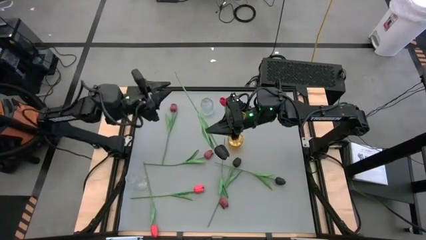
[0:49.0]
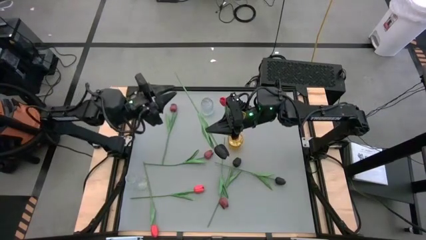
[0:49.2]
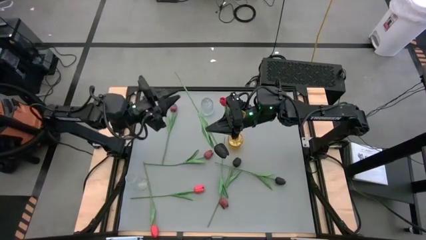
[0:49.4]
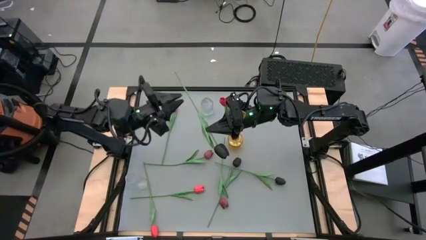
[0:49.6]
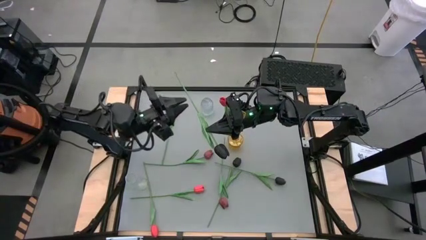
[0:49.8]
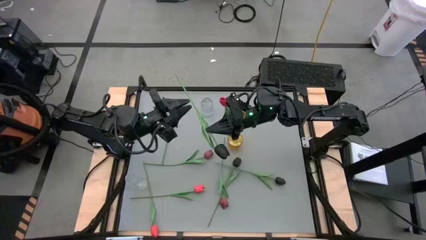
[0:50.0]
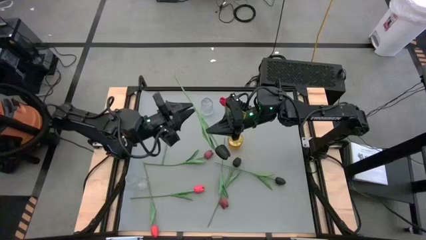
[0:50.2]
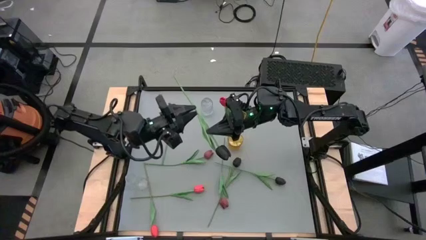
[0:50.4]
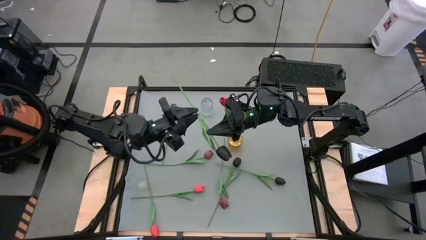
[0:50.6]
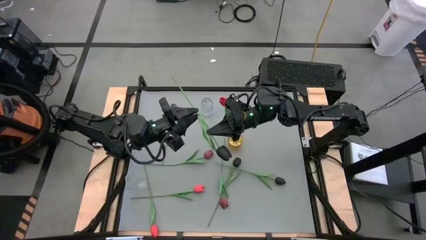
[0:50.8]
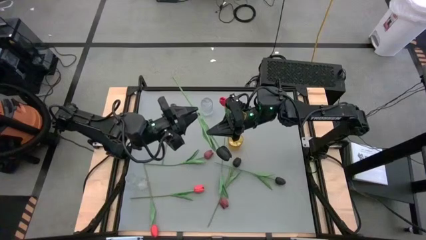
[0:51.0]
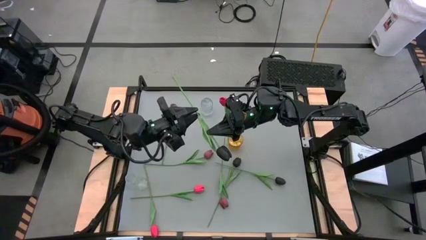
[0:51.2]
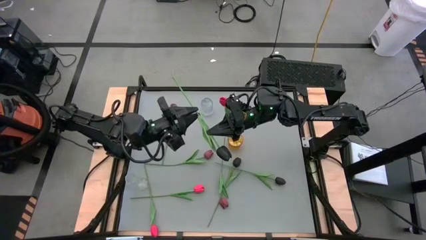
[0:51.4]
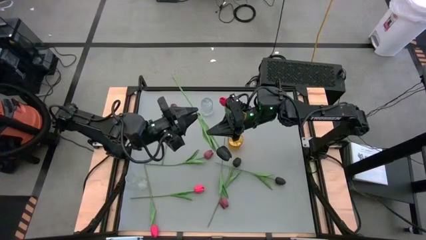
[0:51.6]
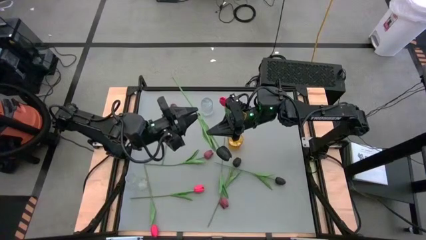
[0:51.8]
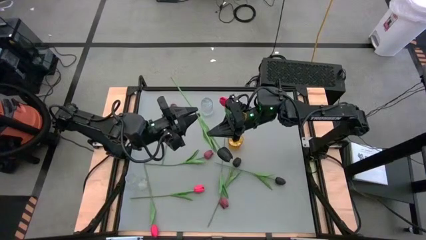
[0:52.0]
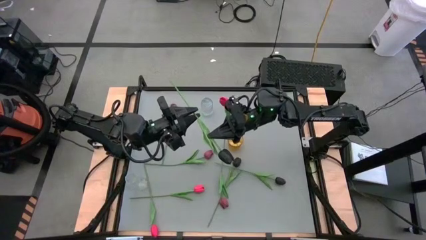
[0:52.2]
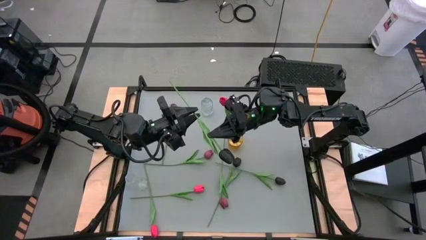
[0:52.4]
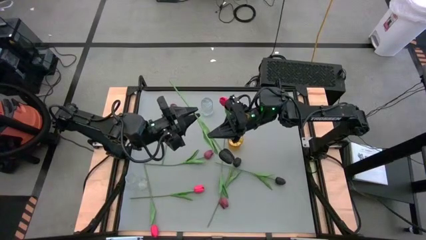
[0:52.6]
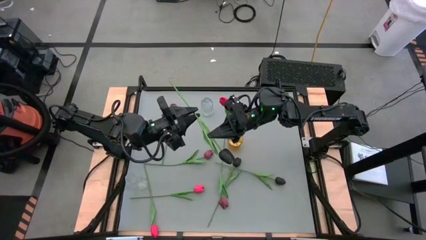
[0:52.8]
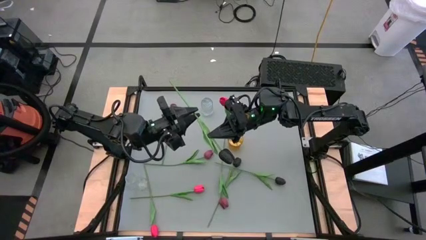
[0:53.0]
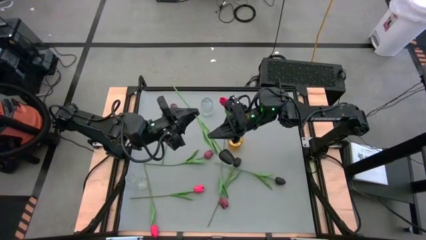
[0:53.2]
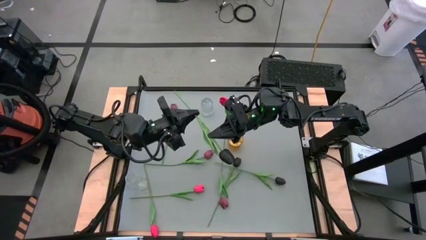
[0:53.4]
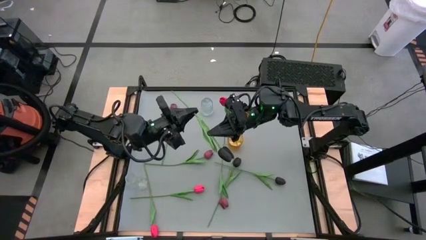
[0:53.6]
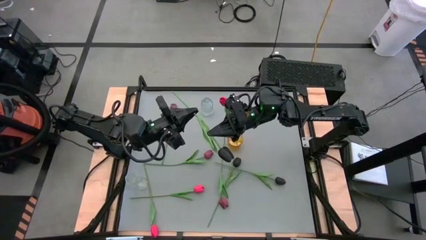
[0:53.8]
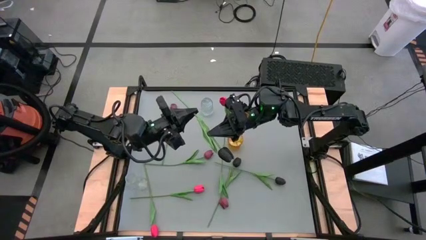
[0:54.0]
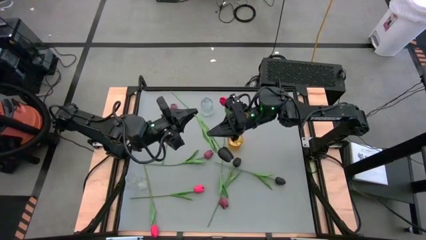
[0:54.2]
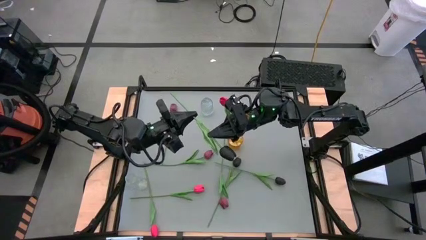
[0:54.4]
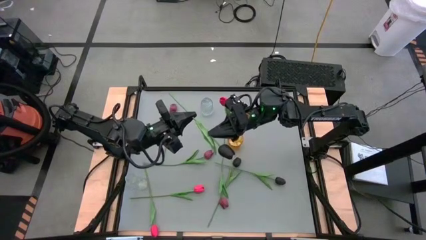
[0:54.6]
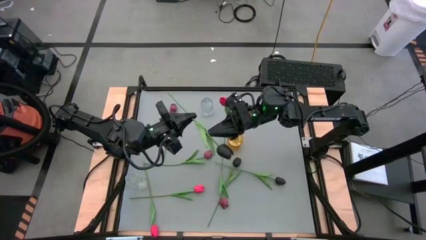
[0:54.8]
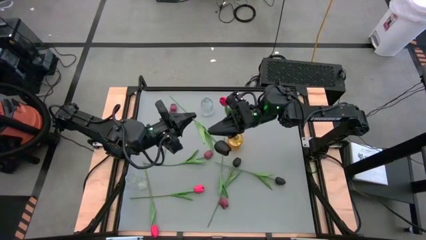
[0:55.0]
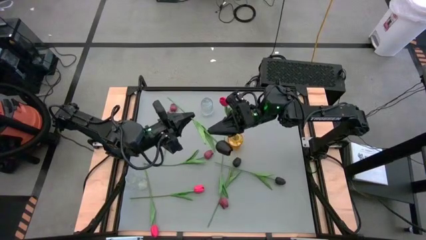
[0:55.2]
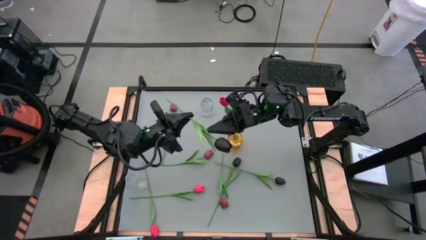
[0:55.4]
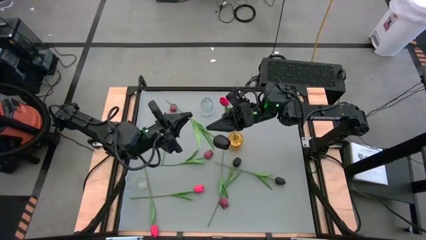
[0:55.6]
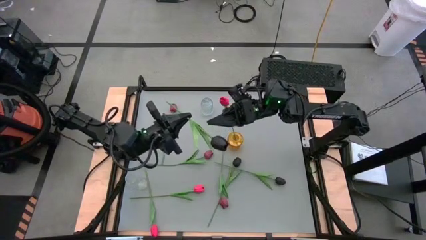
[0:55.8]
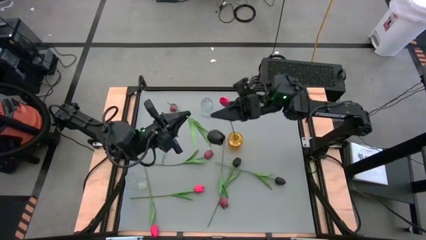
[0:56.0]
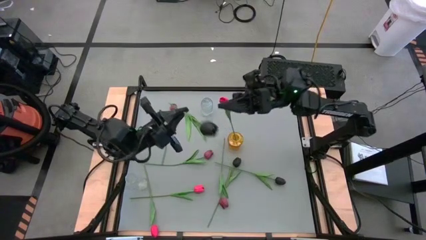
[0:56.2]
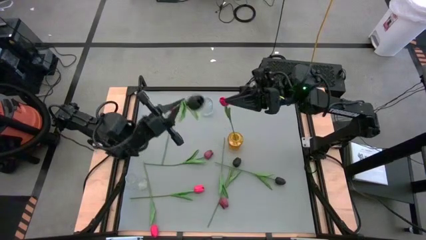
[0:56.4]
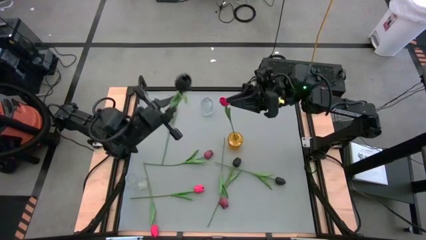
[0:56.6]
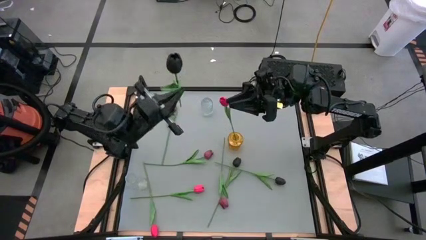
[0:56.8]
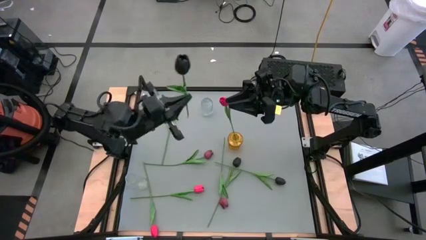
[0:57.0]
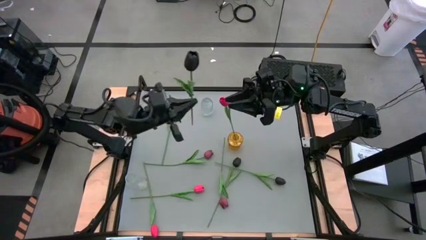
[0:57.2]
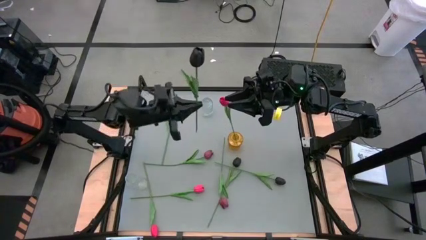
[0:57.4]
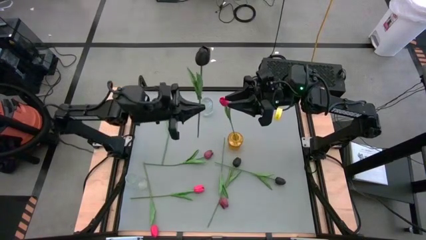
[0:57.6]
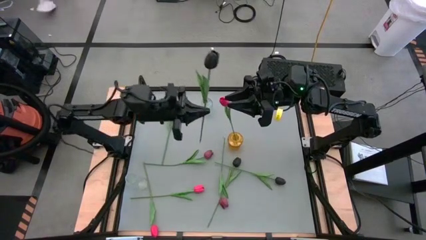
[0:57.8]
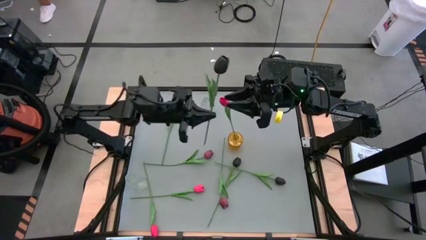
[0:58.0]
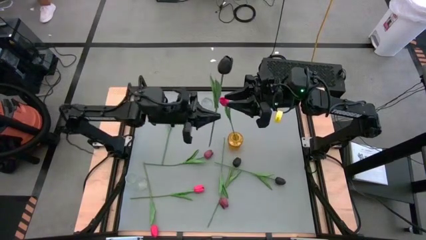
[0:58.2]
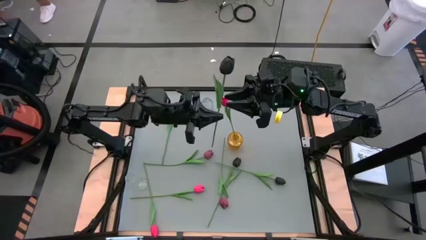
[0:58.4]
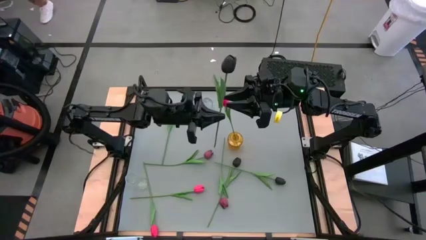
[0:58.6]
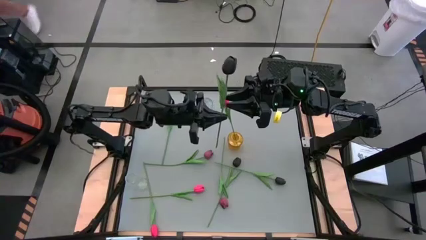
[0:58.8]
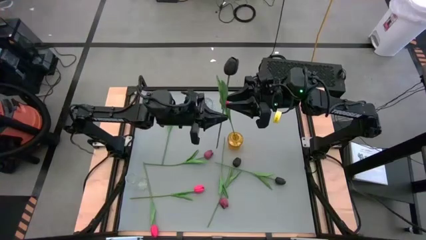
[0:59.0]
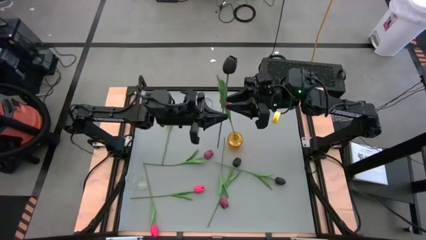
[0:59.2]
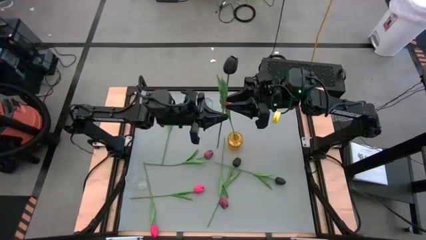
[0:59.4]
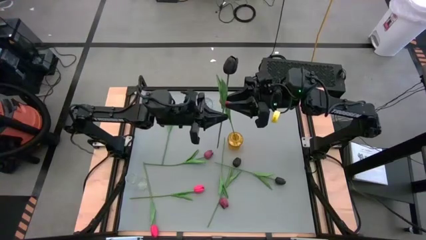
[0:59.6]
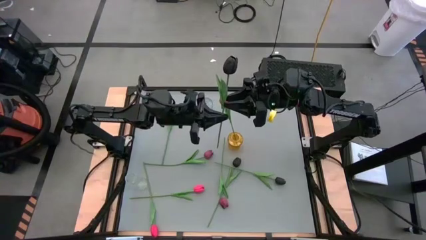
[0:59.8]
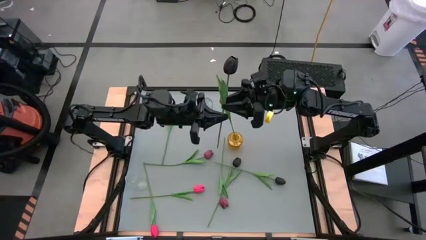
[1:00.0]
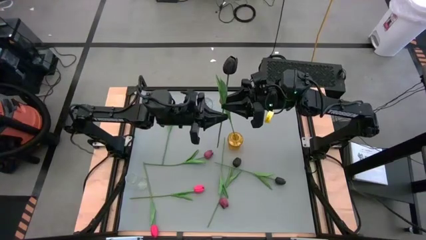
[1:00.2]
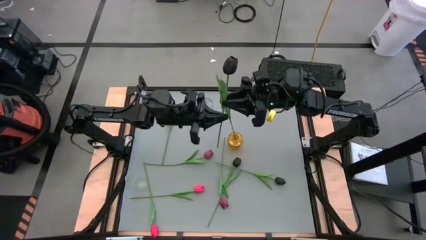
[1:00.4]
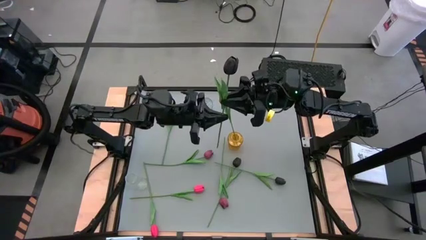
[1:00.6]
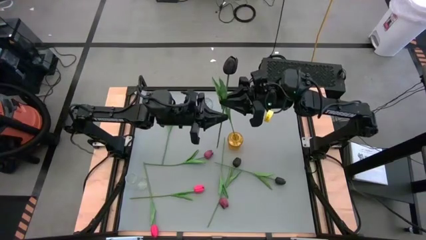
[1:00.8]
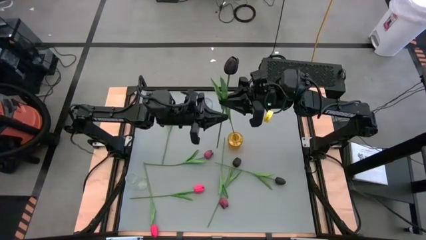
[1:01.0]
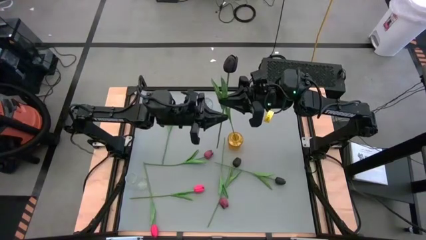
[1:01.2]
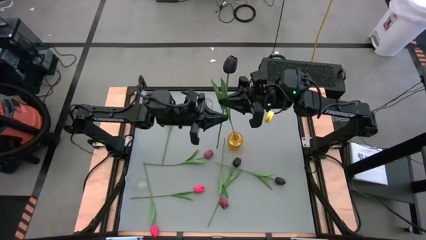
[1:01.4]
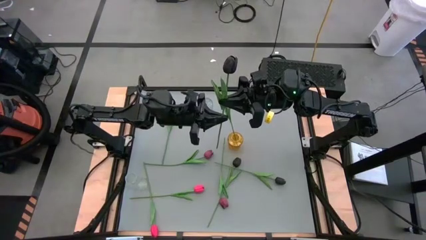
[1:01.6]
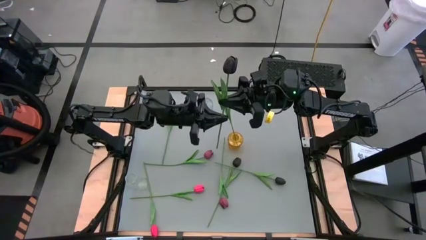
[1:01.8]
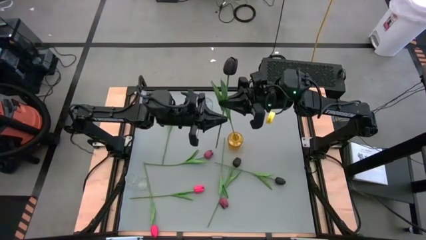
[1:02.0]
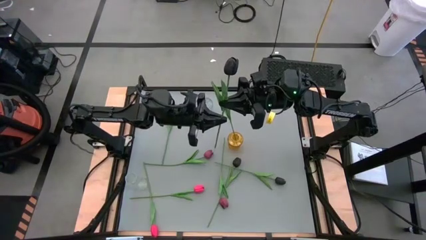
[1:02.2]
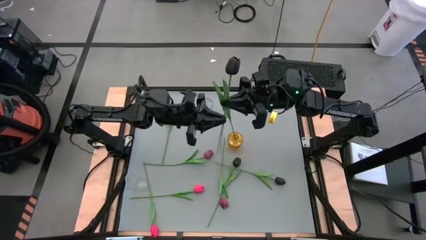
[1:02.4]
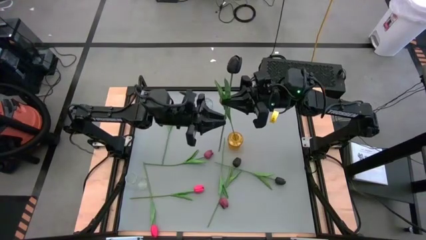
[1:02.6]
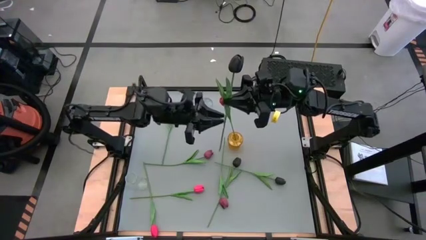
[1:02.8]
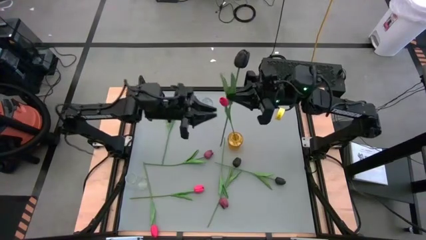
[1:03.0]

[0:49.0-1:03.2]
Task: Sort flowers into vase by color
Put the top black tulip into the top transparent vase

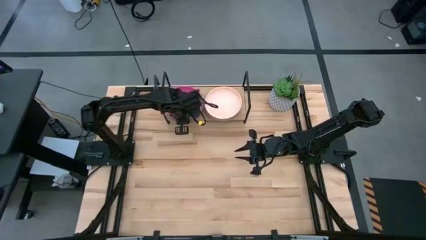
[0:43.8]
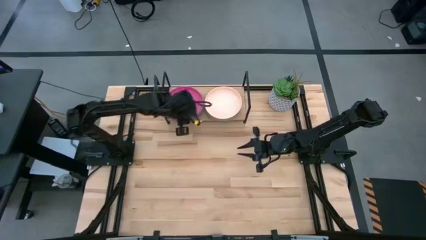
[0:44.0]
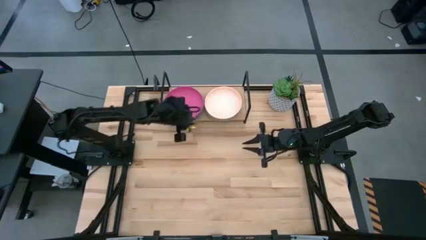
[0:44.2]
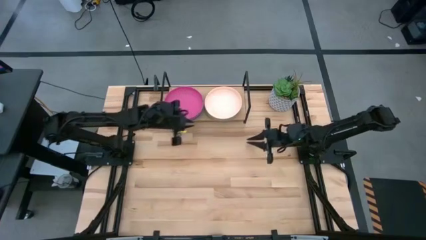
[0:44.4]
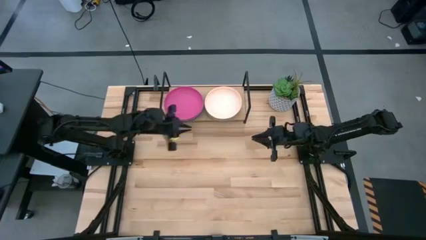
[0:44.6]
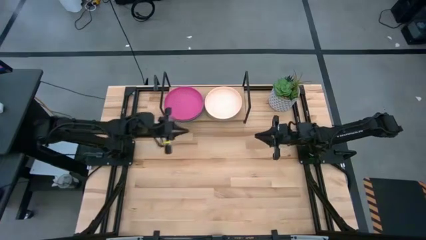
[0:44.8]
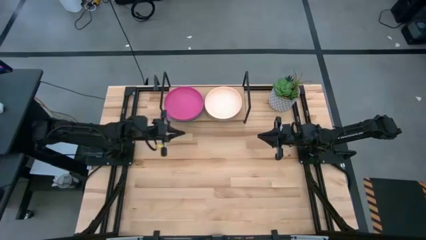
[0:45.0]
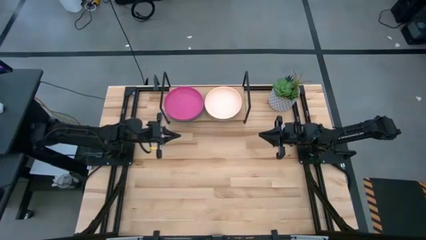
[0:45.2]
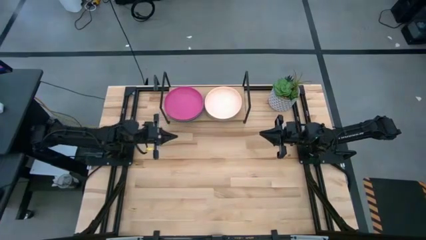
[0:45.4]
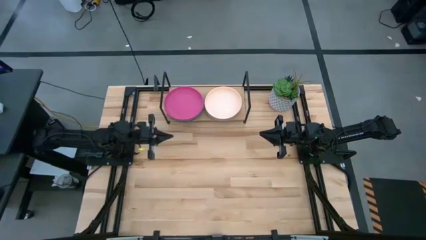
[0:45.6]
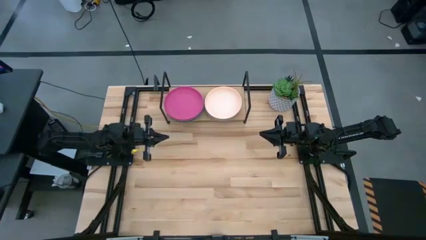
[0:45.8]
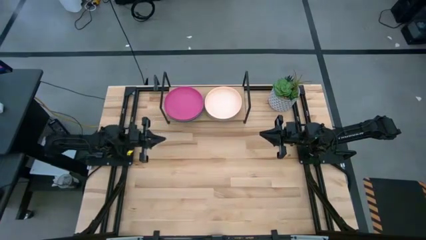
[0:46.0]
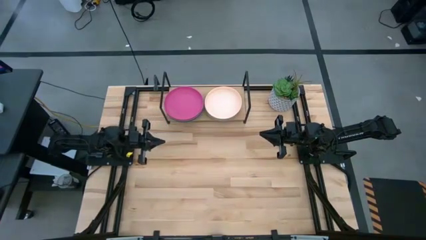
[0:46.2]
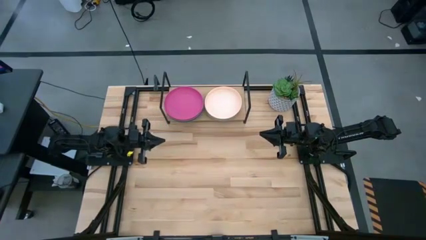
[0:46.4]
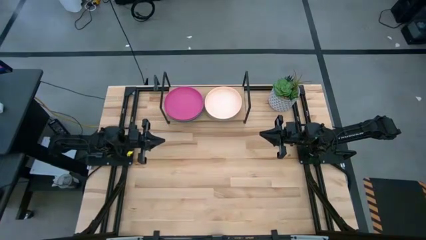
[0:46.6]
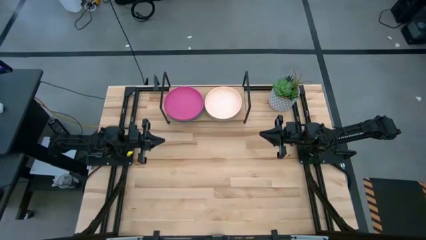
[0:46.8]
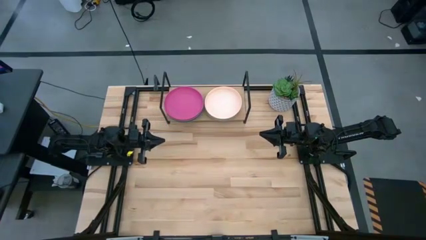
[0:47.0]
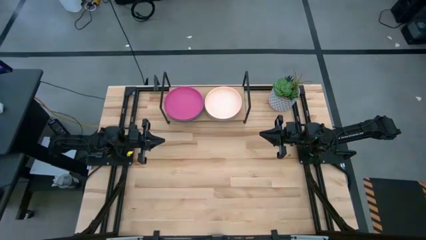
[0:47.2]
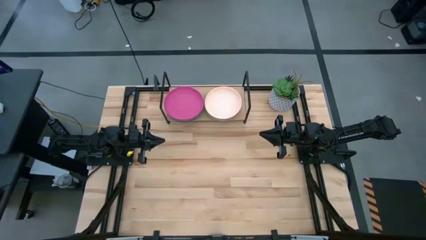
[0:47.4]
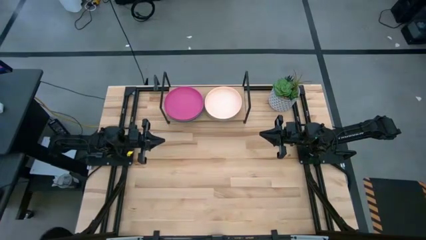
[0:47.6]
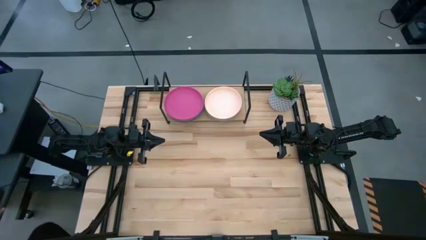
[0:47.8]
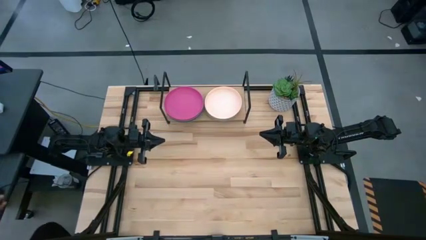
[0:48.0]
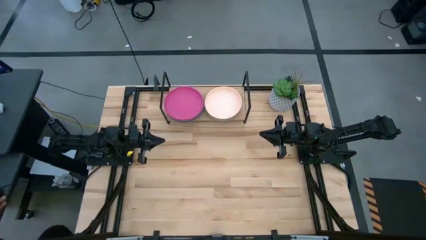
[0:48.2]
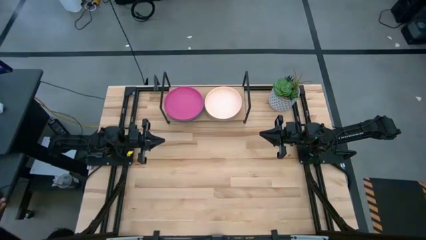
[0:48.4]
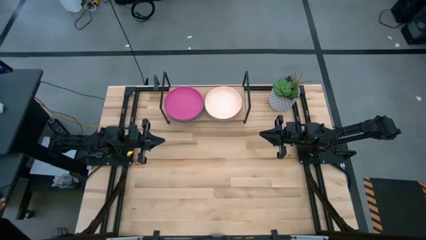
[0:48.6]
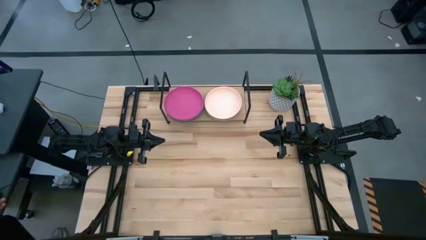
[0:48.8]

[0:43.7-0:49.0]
Task: Place and stack plates onto a shelf
Return to Home Position
